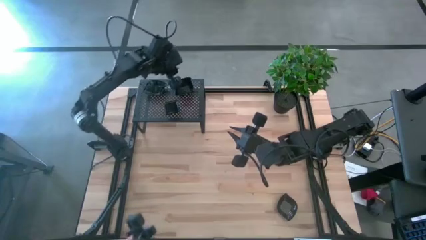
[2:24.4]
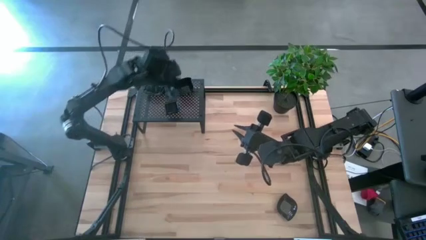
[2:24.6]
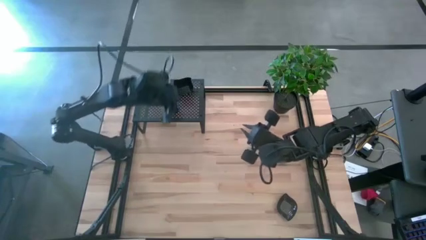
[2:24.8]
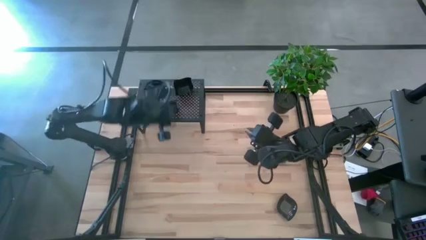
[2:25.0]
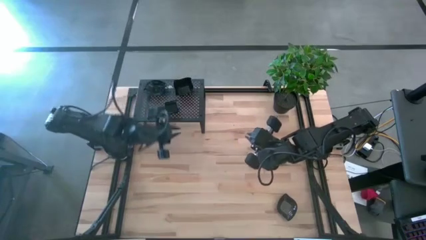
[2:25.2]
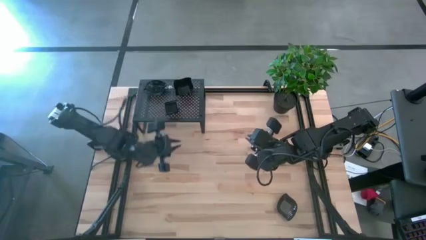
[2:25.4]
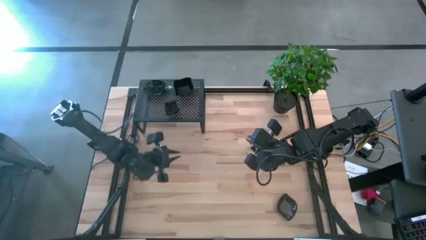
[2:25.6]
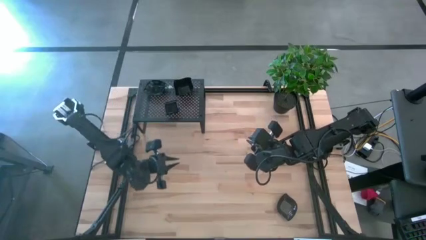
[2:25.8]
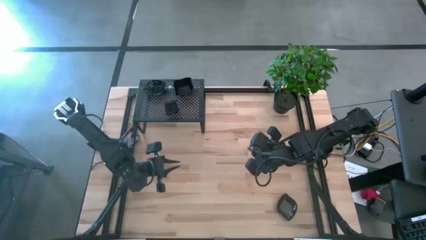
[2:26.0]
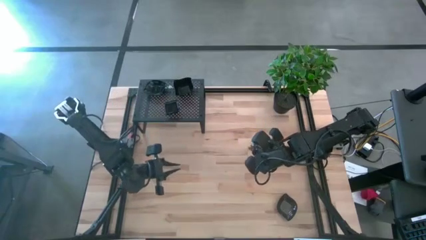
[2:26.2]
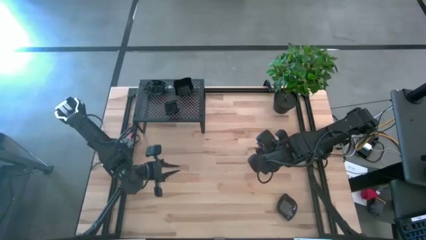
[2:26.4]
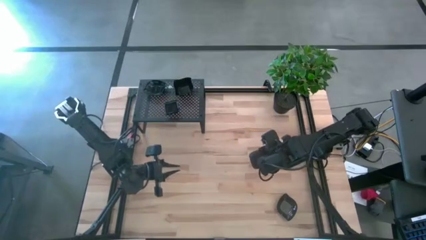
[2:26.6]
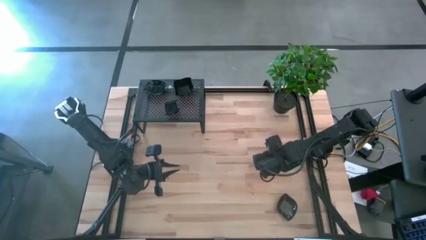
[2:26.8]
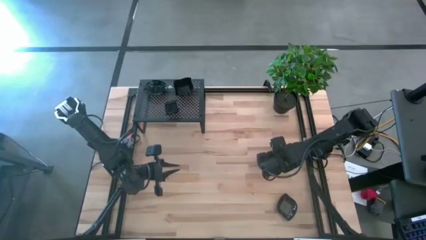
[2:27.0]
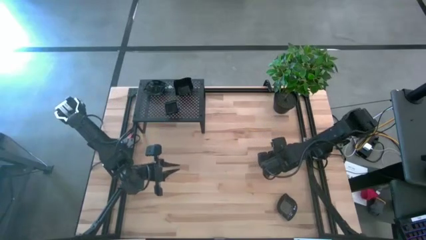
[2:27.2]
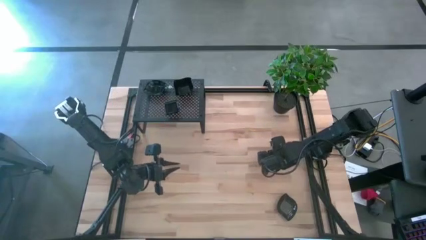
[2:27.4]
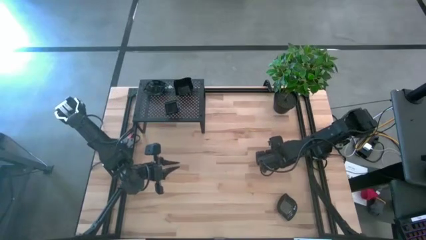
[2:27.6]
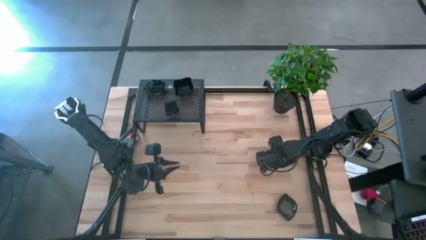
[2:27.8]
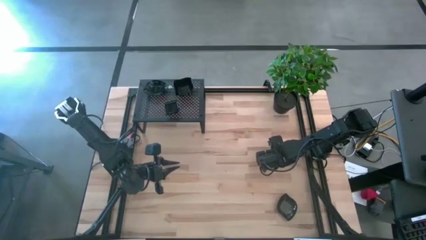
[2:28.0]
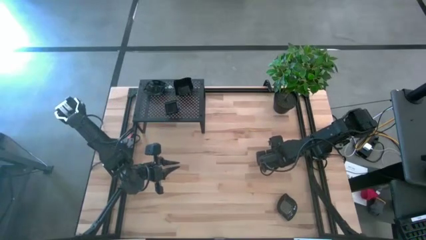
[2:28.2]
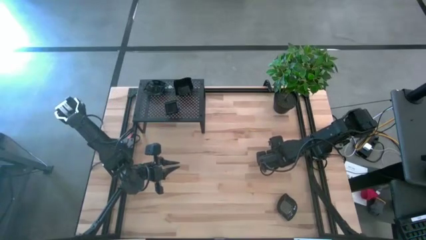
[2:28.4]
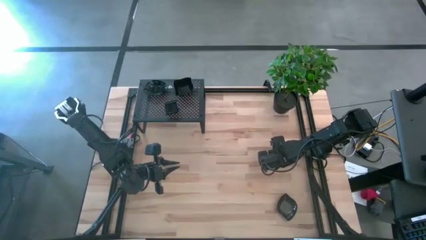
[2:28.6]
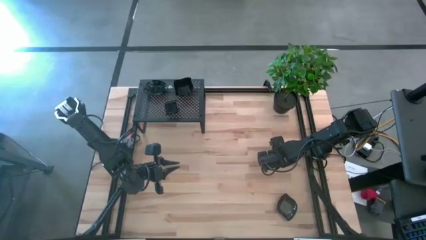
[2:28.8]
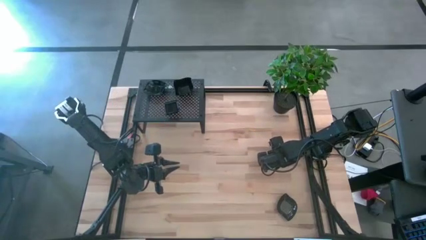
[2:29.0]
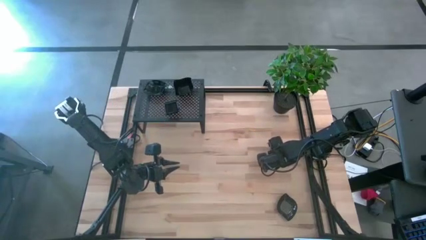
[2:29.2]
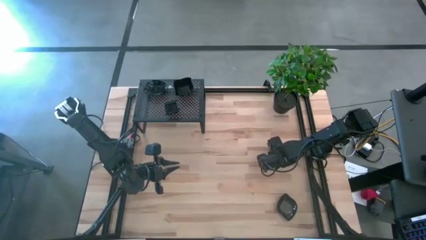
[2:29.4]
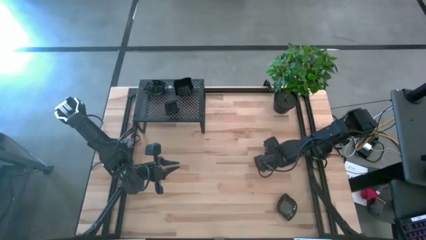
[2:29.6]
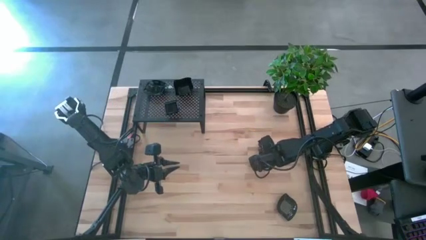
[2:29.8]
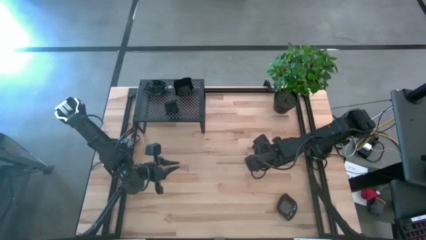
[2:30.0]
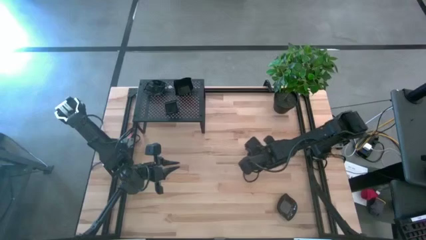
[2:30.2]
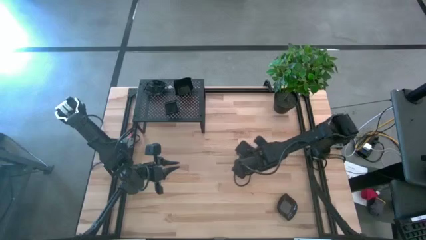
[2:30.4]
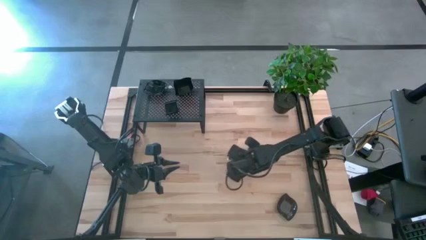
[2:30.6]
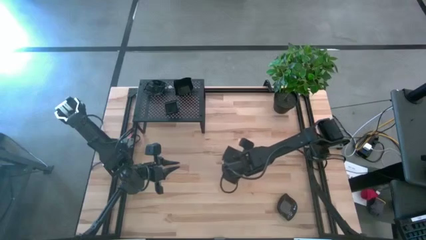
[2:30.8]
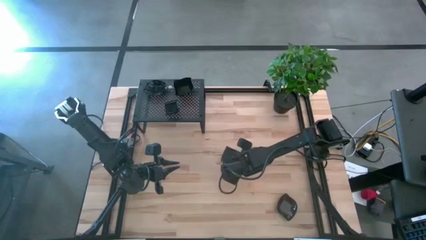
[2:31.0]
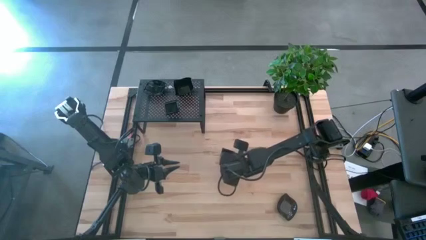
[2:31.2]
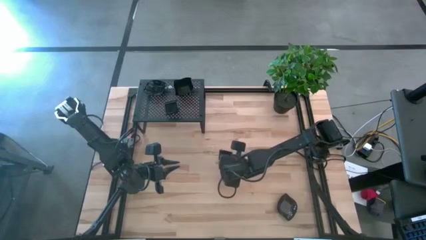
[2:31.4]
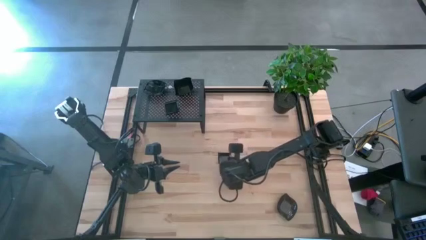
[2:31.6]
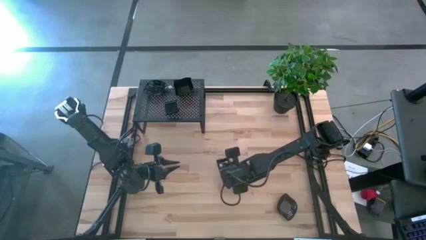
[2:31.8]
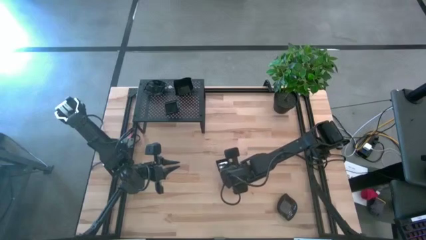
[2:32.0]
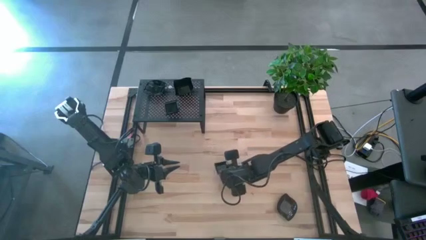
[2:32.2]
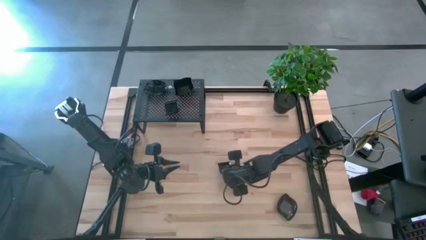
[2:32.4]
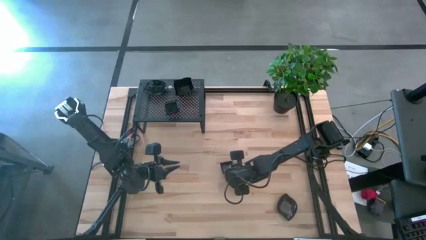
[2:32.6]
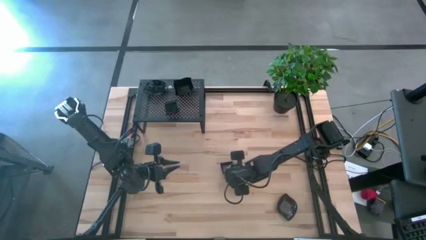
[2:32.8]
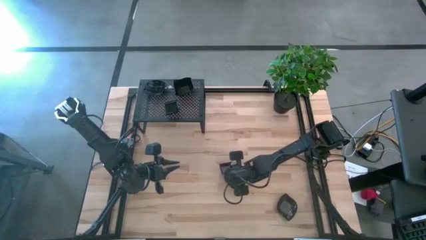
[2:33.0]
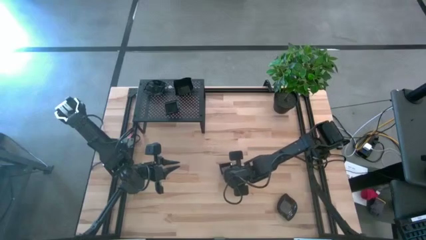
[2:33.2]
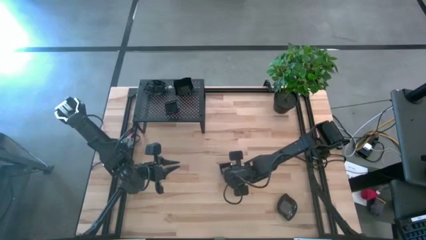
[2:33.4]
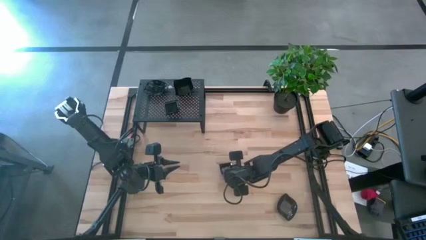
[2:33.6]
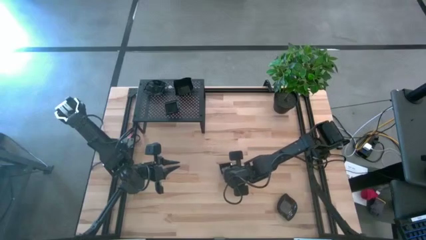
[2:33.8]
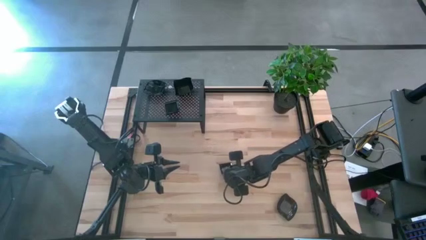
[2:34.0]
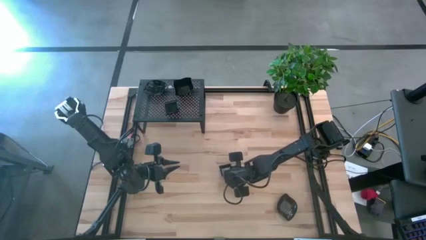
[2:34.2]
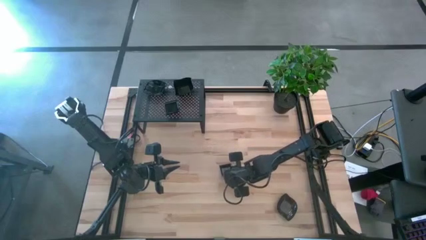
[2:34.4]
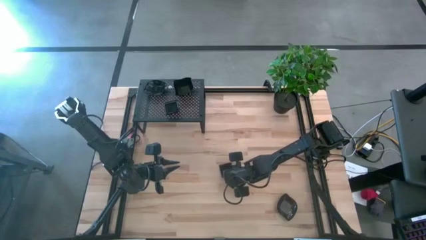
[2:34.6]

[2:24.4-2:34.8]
Task: Pick & Place Mini shaped plates
Stack the square plate on top of the stacked square plate on the shelf

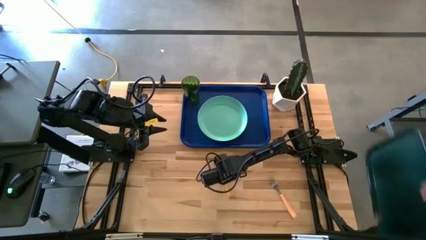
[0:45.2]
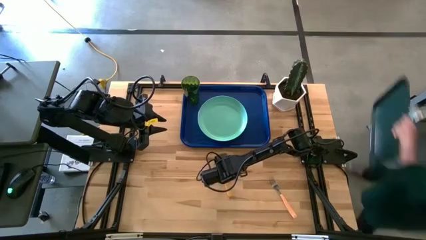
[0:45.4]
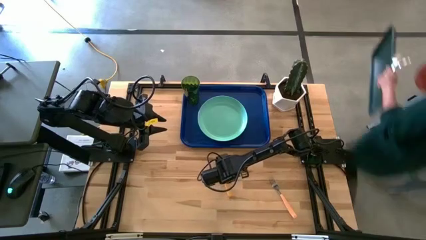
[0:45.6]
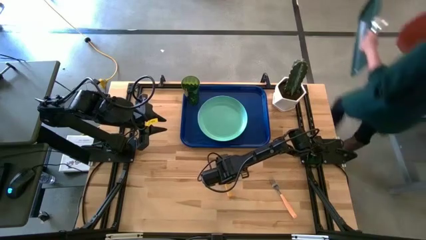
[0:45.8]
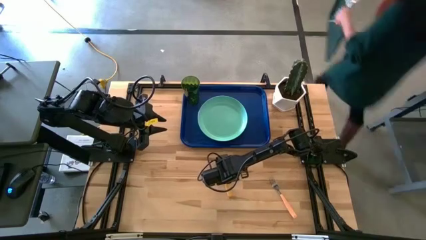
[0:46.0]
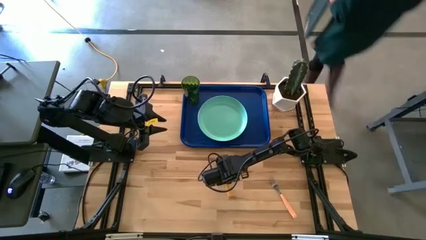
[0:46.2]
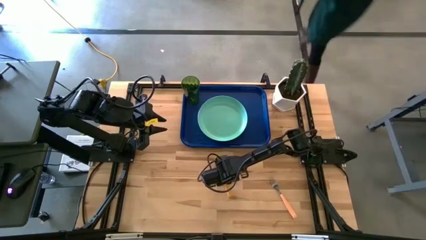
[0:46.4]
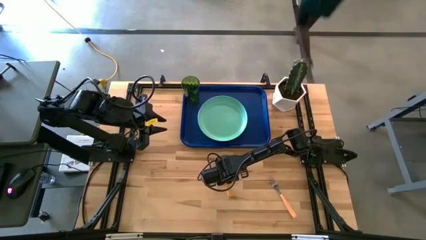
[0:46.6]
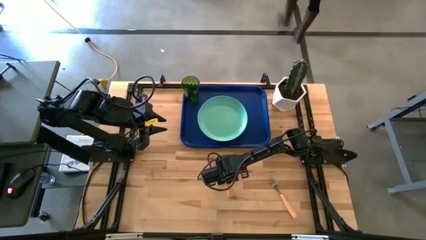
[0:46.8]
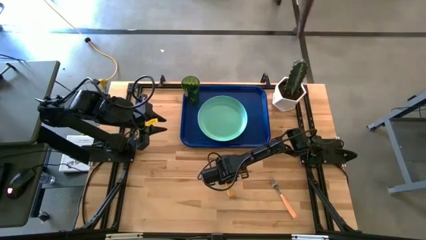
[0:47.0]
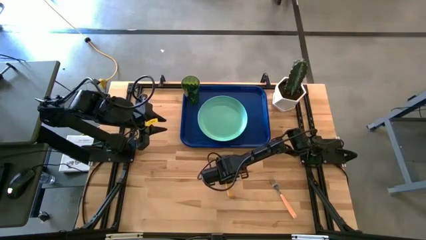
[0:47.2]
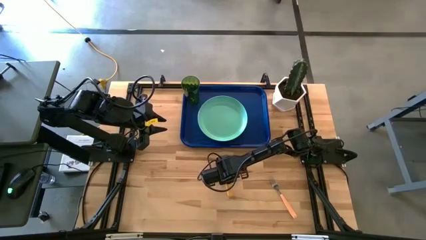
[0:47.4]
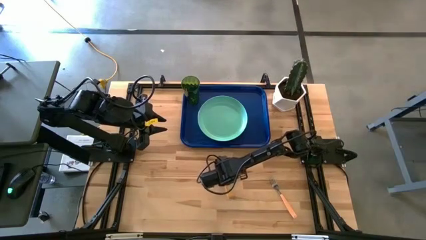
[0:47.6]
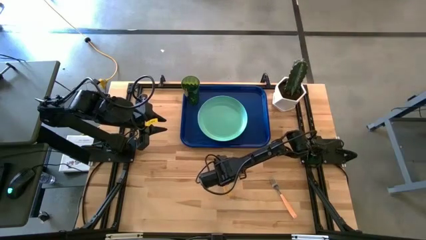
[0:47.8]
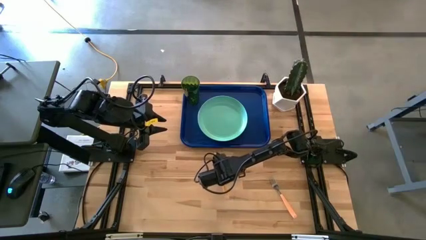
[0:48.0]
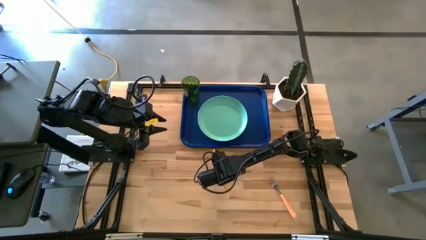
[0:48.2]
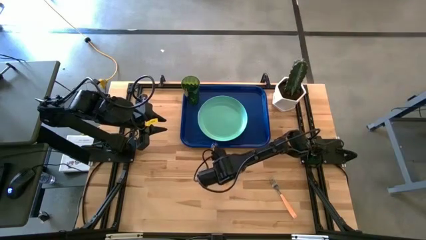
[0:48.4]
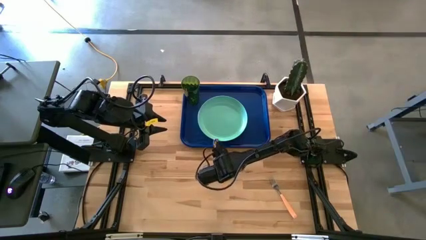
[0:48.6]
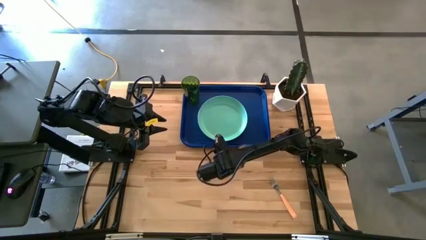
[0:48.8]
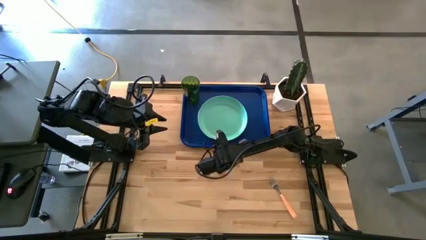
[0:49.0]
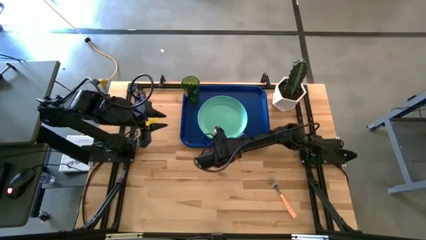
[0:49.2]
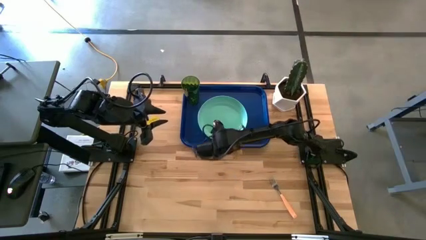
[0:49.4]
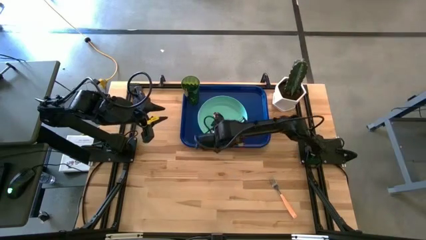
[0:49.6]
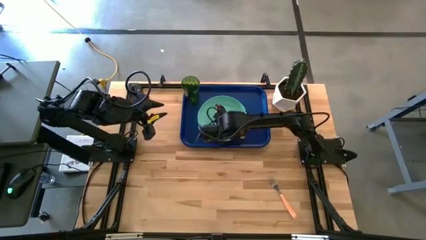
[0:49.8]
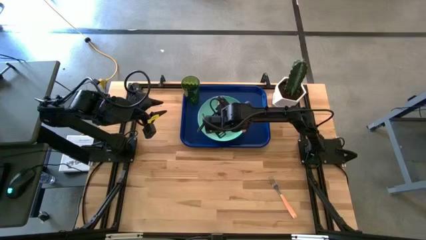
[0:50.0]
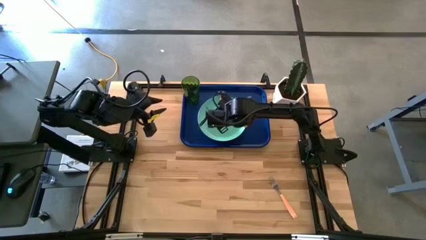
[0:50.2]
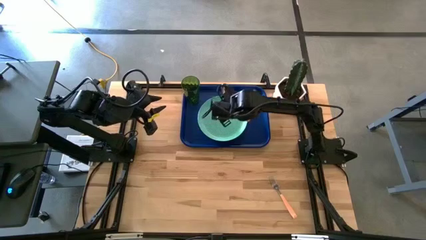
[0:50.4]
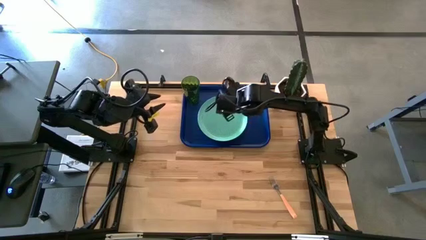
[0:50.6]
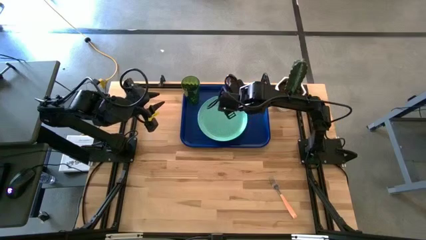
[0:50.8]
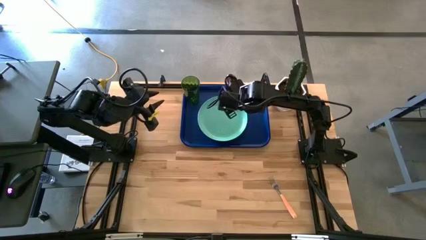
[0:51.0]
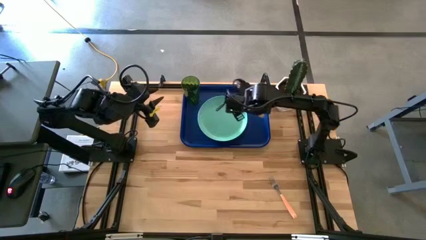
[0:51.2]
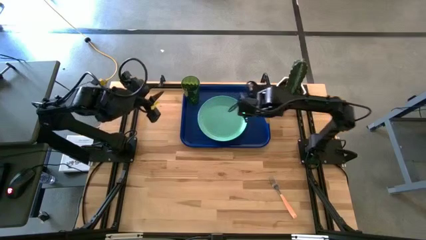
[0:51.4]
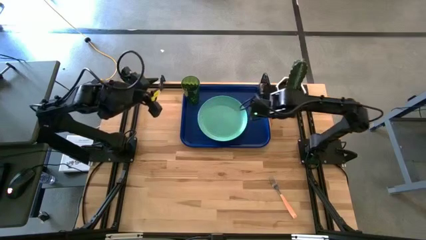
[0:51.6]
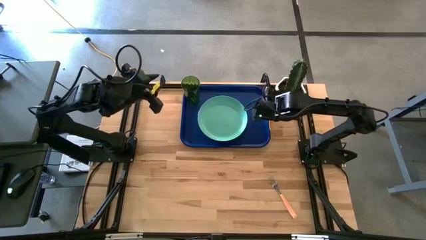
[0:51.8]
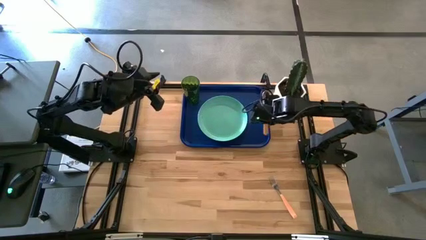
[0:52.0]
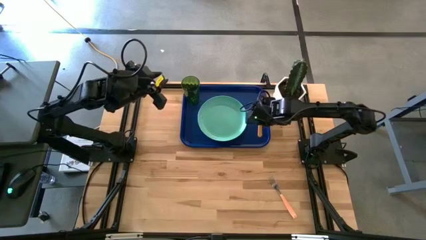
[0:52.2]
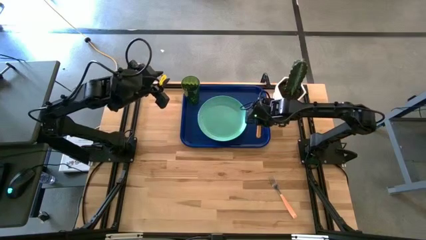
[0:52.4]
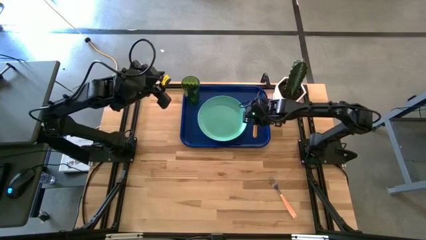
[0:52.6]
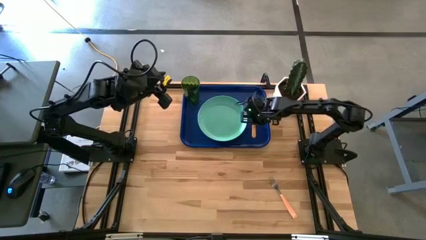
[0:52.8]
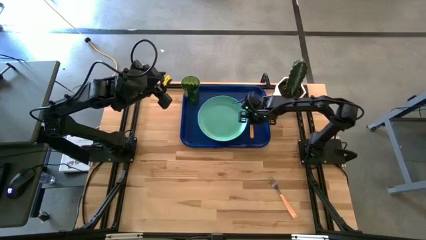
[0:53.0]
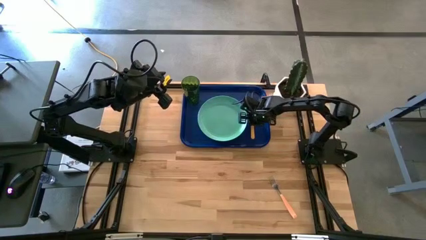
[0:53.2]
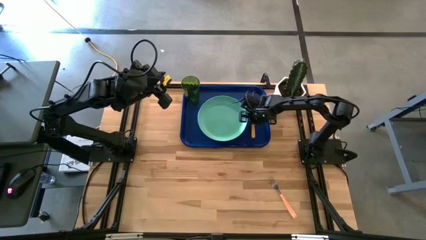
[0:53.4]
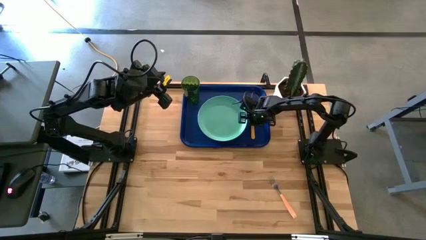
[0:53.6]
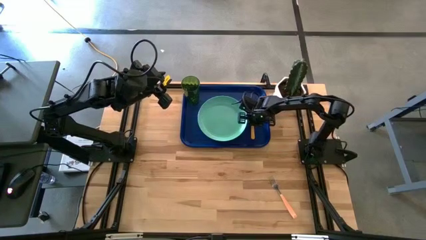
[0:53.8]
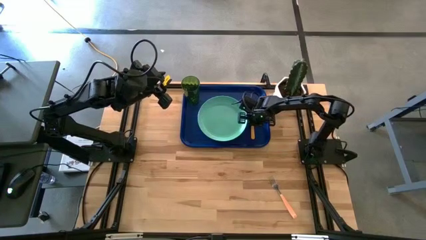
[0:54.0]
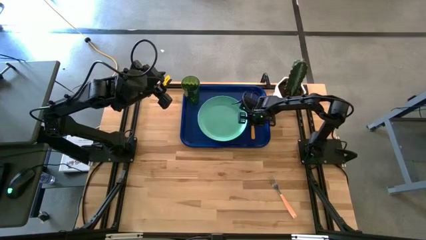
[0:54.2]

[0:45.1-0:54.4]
Task: Pick and place plate/cup/fork/spoon on tray
Put the yellow spoon on the blue serving tray
